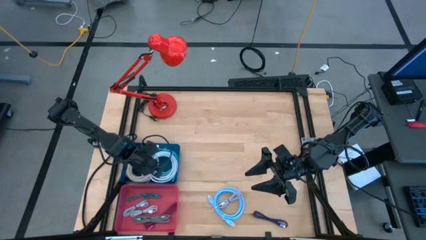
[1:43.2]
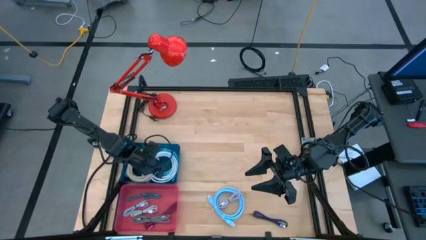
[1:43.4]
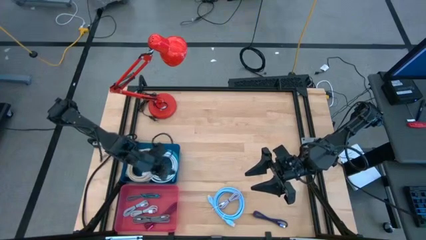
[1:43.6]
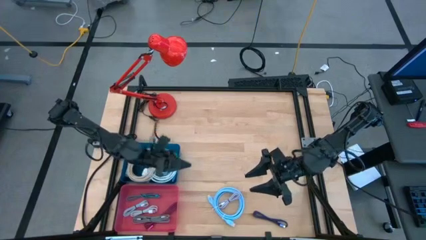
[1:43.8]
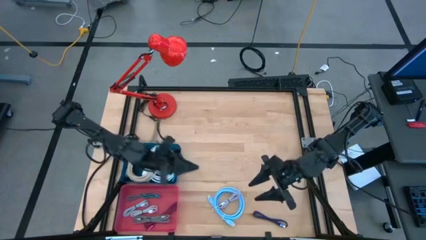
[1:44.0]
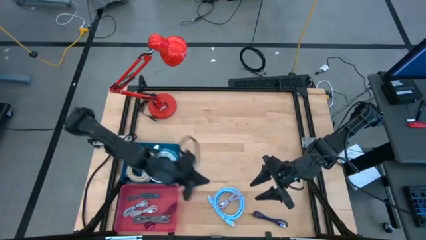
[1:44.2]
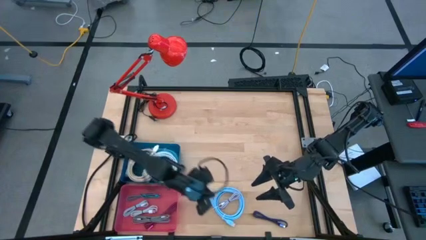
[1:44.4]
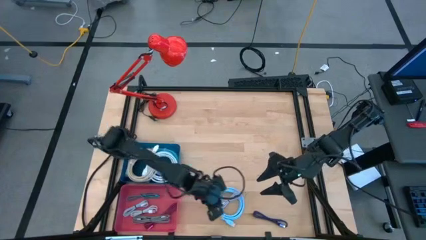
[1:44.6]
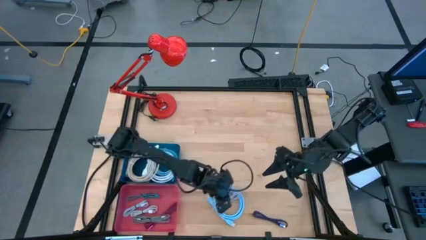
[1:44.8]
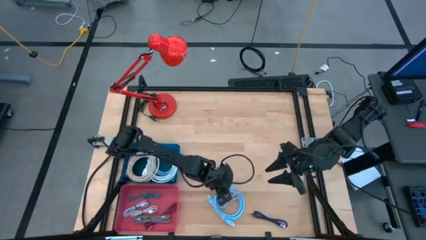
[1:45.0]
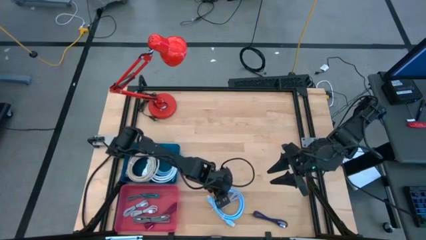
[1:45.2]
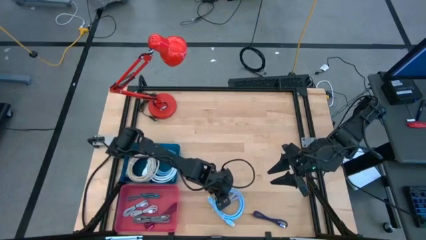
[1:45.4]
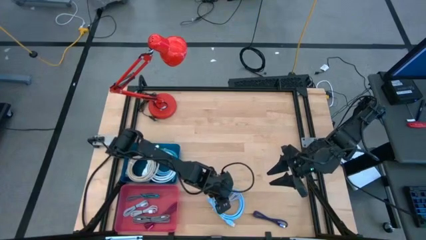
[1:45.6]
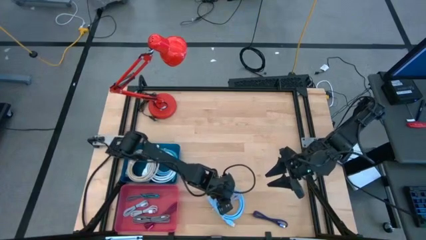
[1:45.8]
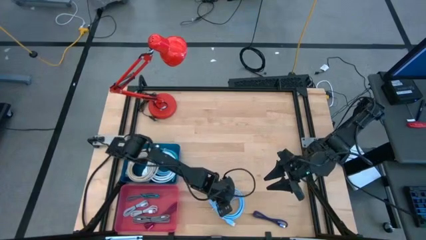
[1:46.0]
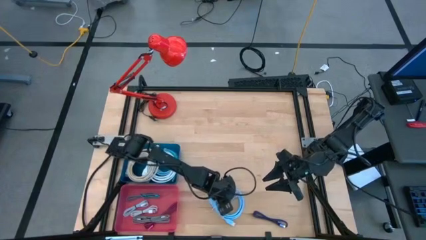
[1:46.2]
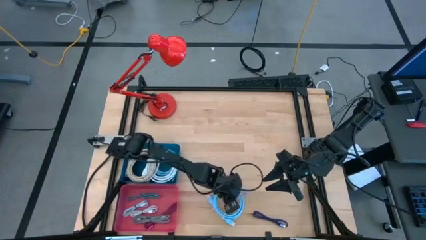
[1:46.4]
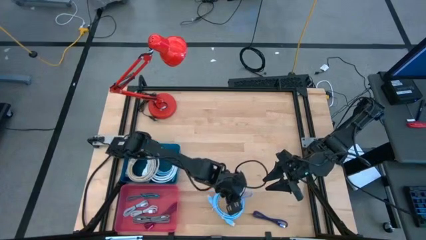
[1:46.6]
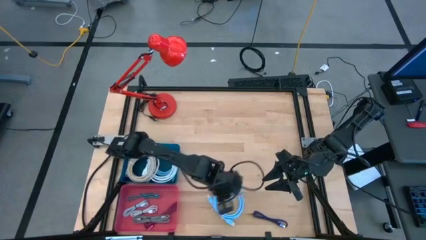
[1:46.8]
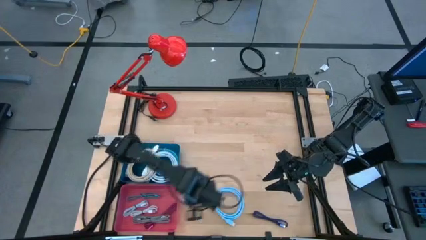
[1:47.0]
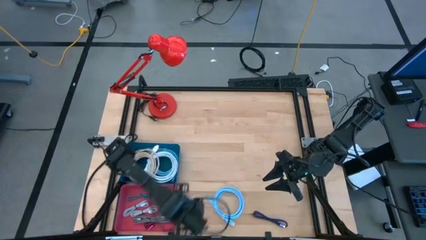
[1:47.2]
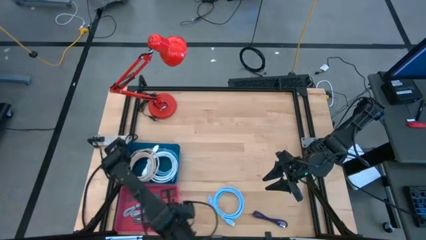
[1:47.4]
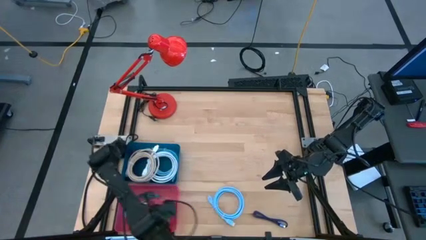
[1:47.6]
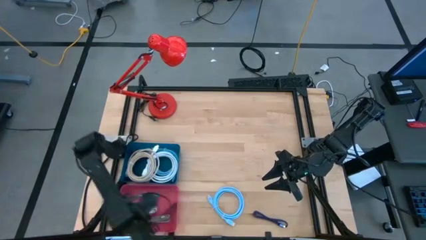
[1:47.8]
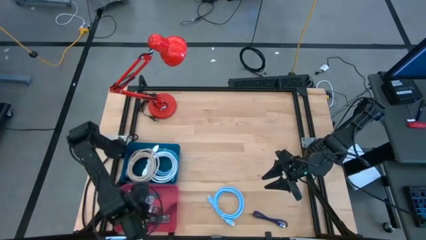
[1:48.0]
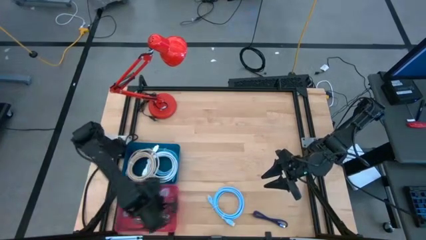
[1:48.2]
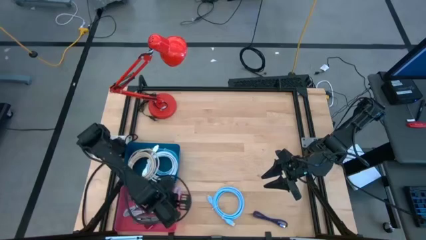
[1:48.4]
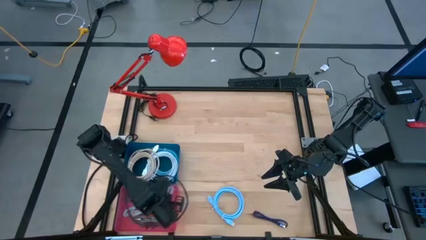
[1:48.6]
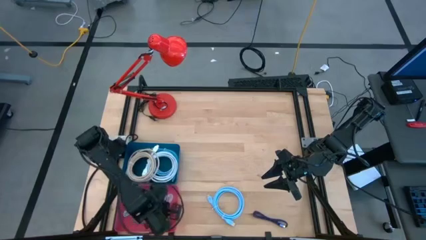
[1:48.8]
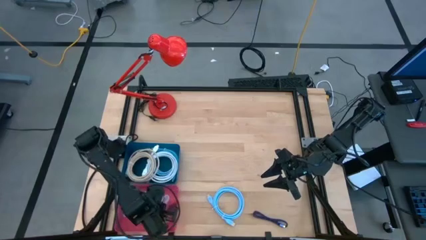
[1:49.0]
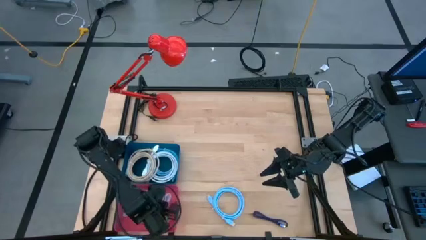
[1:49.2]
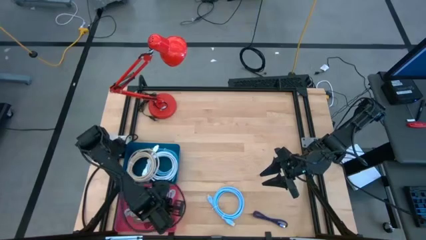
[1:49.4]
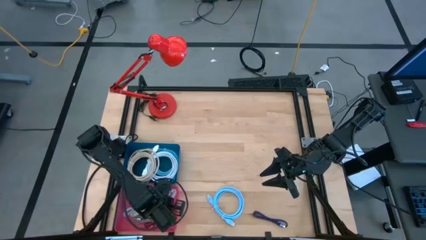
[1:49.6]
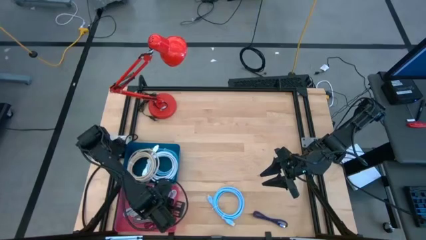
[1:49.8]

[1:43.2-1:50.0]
Task: Pick & Place USB Port
Put the violet USB cable into the red bin

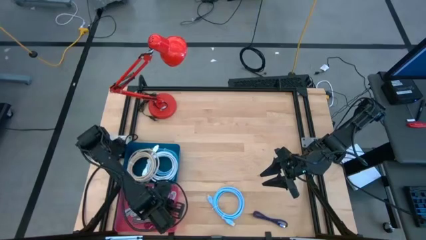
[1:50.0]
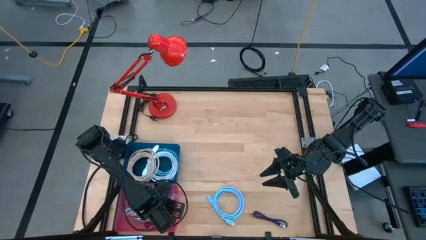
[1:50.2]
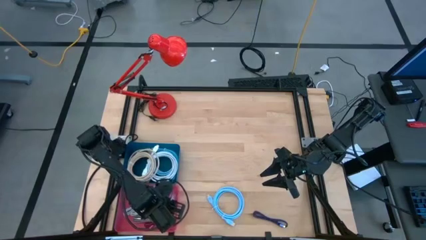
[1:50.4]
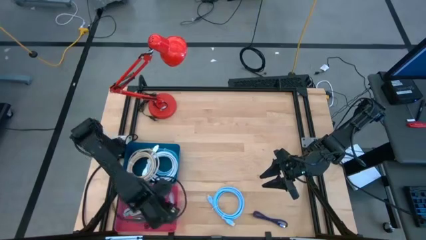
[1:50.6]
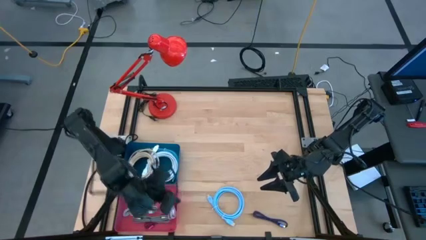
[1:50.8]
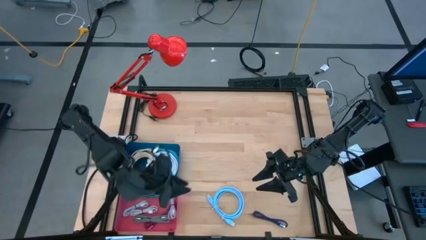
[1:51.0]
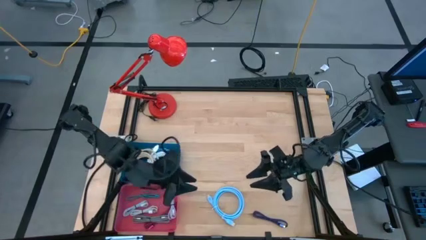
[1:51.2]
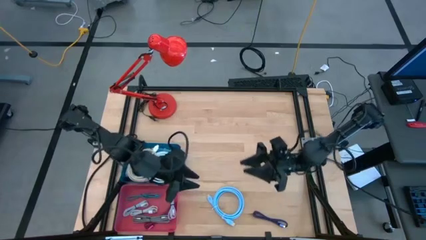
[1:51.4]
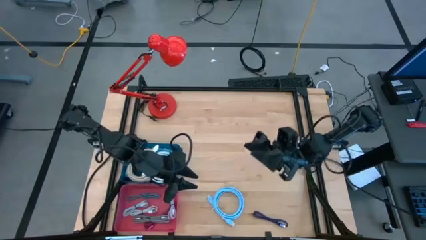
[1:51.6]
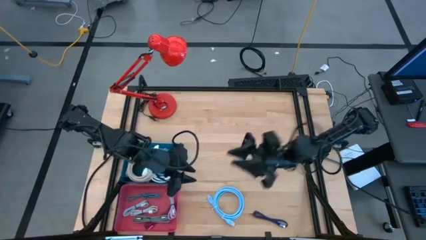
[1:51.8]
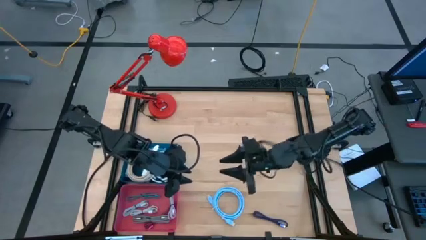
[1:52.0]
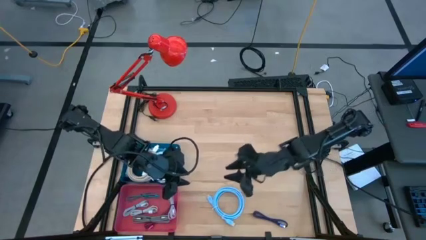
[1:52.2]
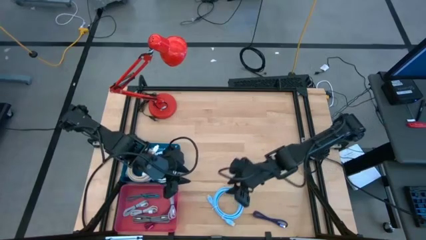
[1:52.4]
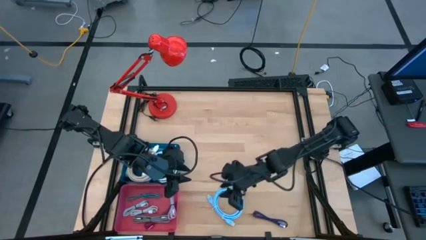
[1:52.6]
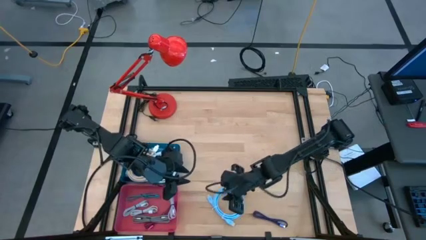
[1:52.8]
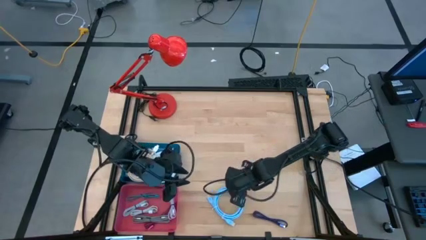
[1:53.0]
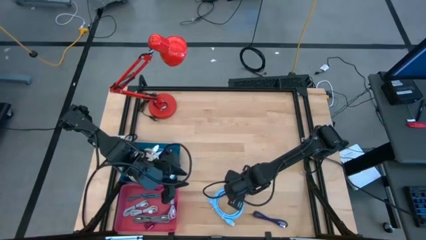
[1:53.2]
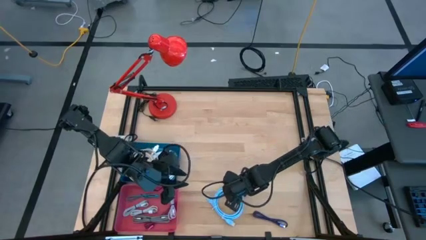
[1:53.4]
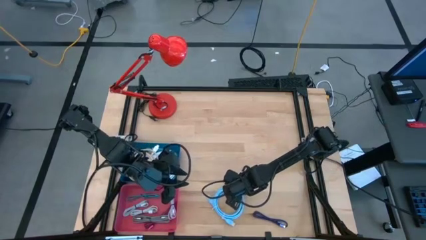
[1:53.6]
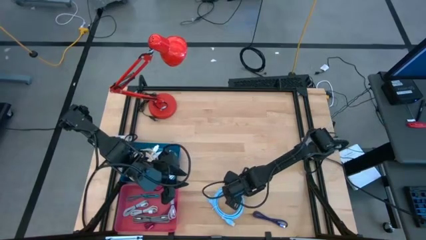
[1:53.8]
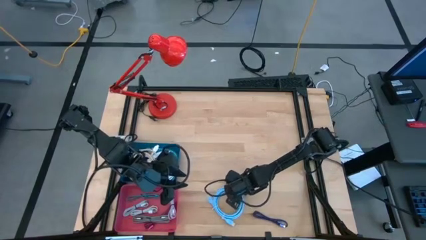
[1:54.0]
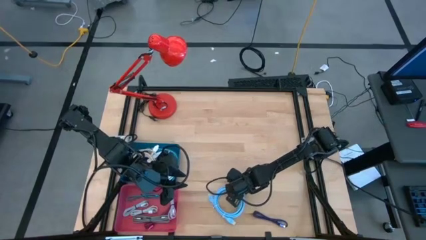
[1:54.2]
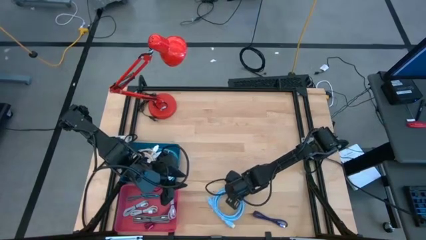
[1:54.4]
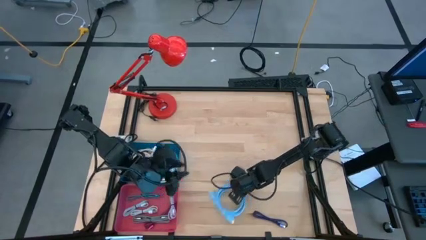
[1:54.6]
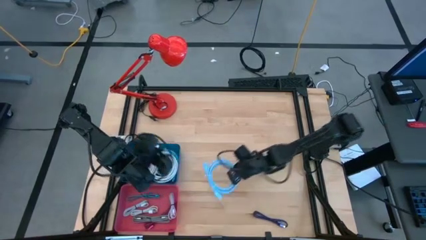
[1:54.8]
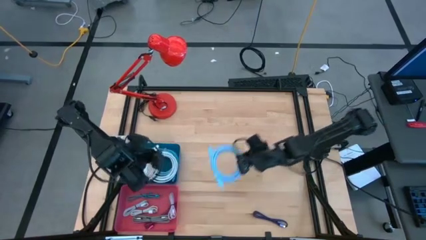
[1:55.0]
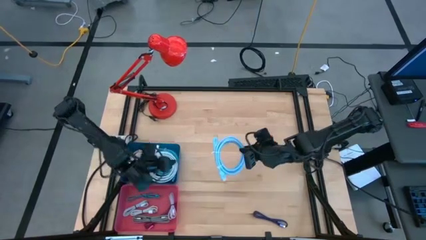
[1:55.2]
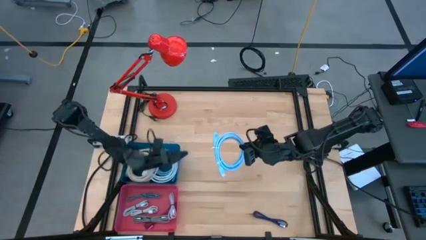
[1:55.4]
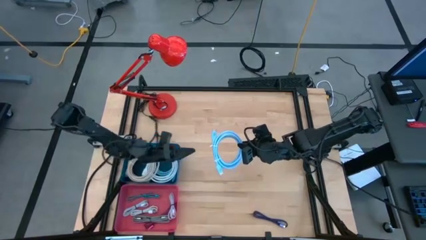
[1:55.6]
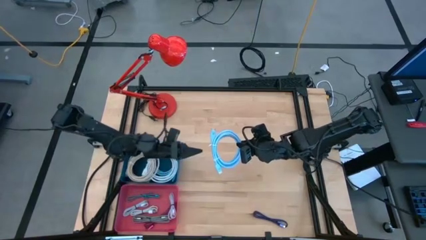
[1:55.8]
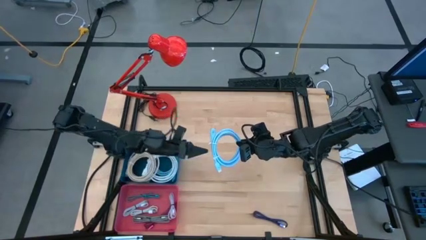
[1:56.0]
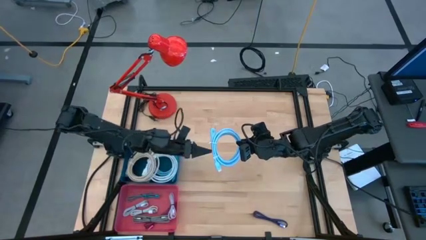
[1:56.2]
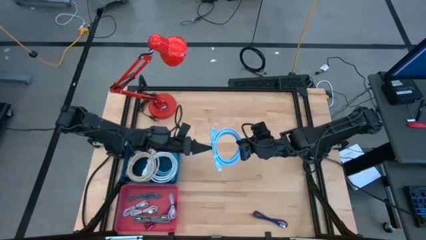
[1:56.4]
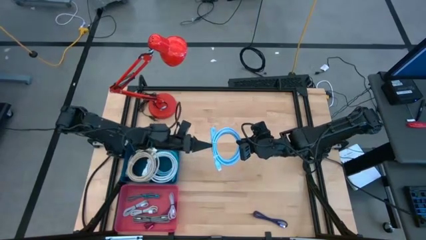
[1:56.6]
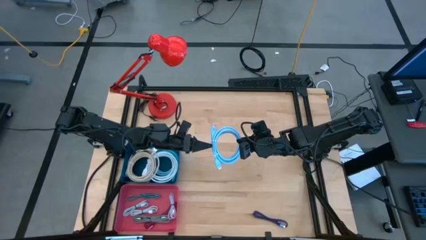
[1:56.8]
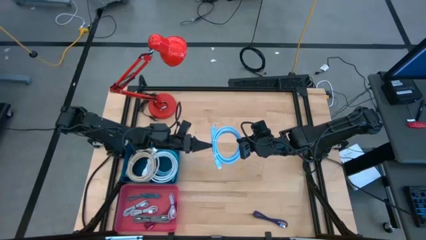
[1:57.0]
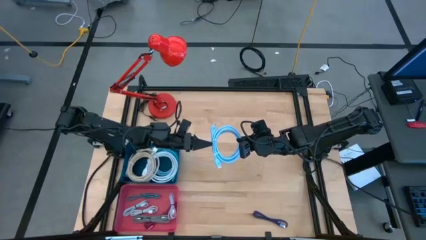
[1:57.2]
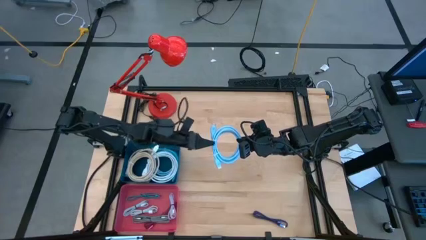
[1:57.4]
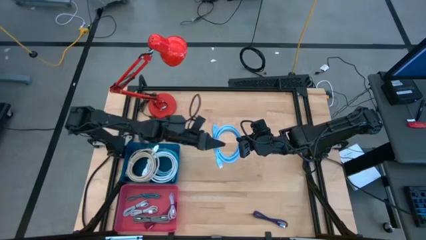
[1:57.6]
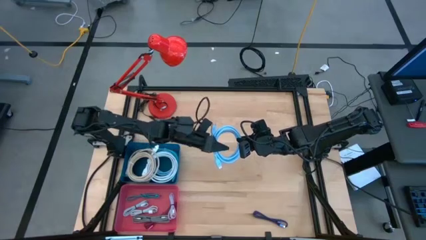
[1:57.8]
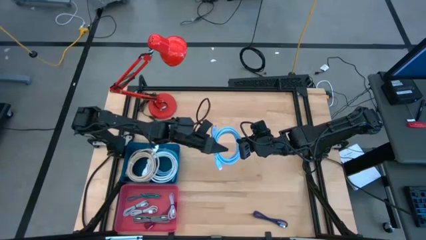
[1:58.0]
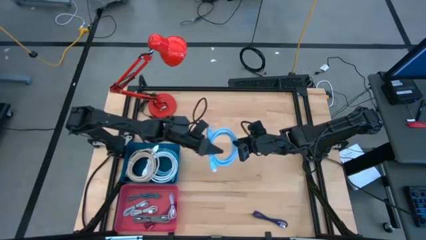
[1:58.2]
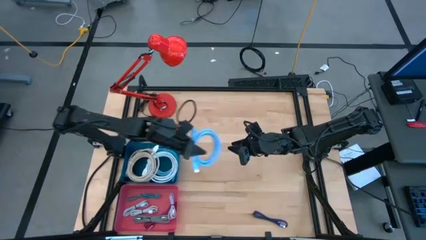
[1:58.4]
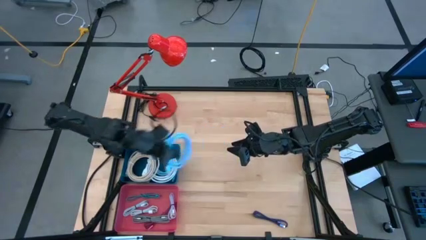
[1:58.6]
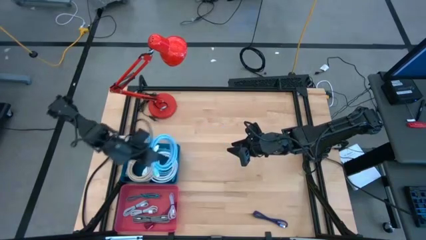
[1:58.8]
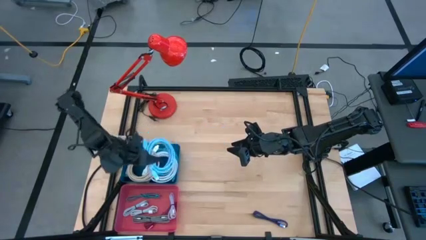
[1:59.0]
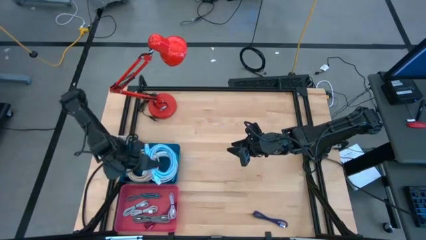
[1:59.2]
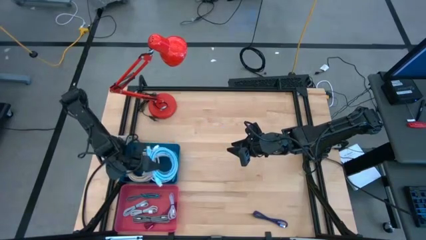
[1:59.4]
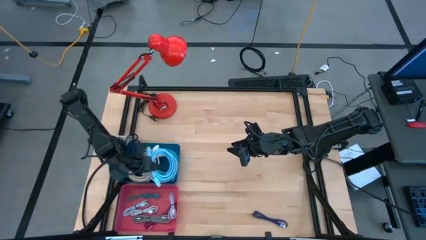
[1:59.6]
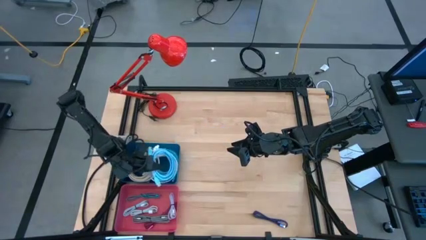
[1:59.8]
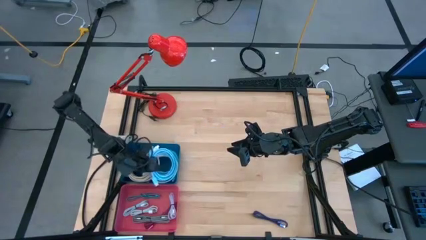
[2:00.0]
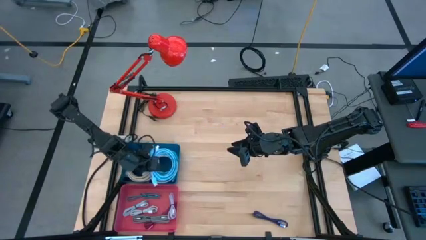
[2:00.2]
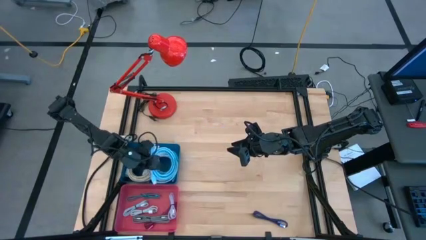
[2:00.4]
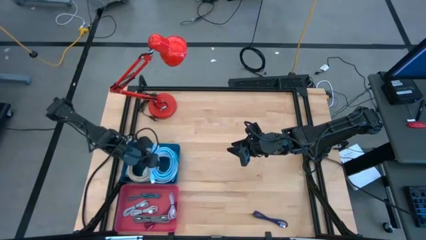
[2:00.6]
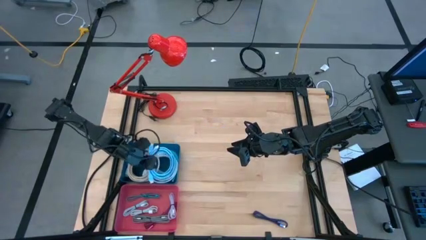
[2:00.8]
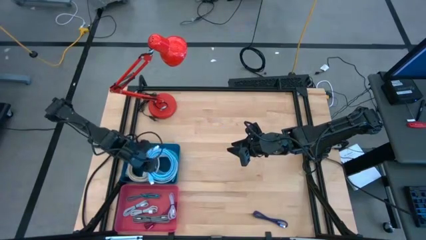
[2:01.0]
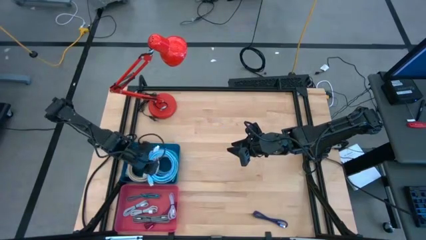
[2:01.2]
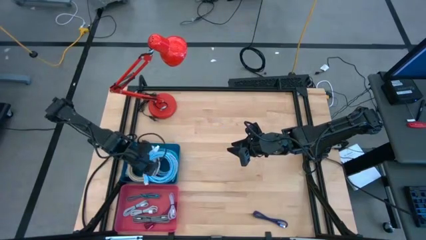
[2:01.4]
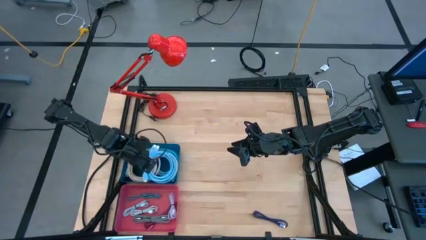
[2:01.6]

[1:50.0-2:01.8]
Put the blue HDMI cable into the blue bin
